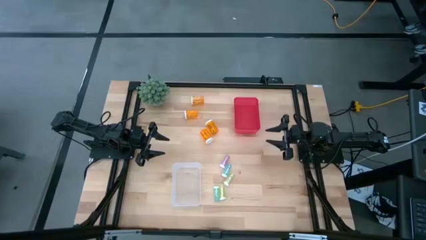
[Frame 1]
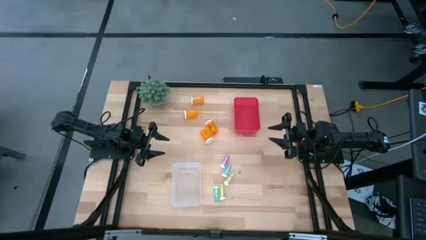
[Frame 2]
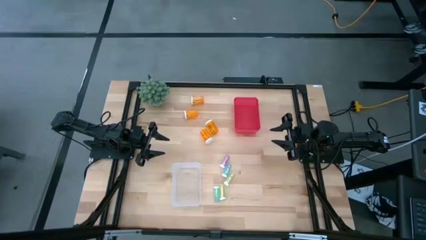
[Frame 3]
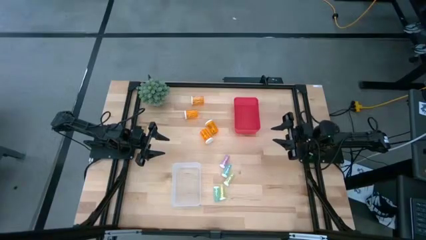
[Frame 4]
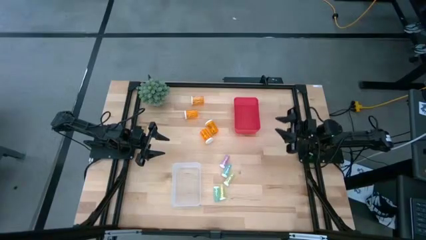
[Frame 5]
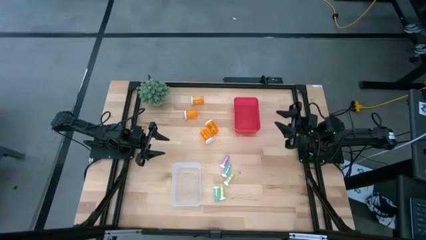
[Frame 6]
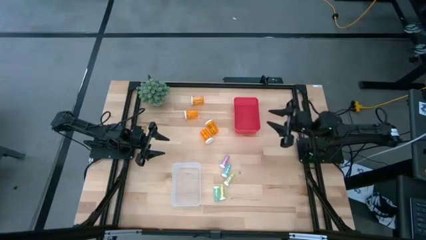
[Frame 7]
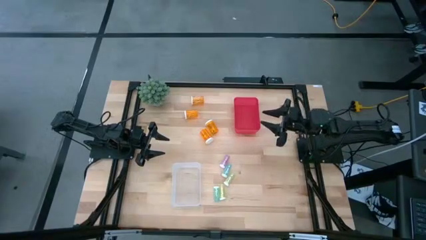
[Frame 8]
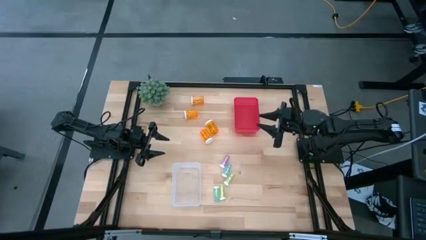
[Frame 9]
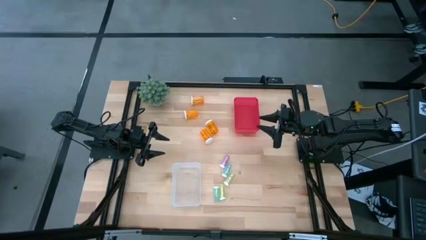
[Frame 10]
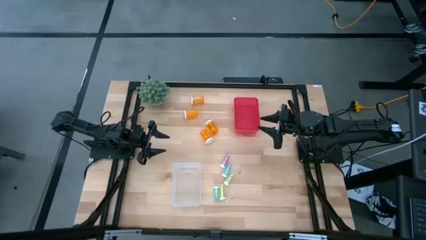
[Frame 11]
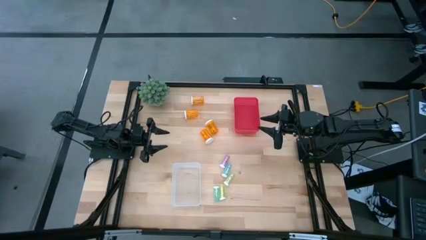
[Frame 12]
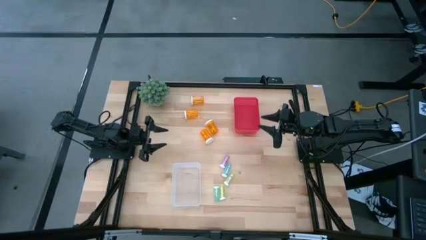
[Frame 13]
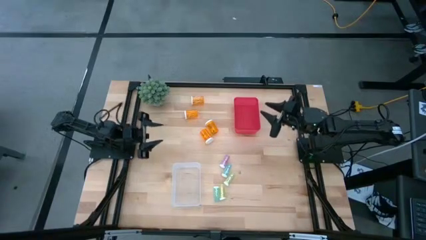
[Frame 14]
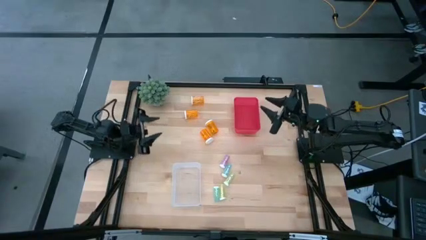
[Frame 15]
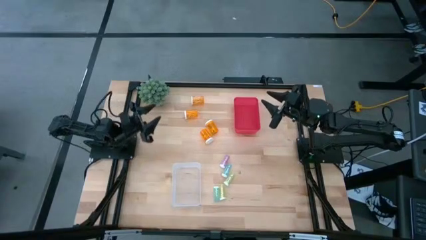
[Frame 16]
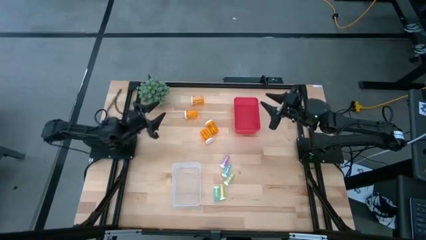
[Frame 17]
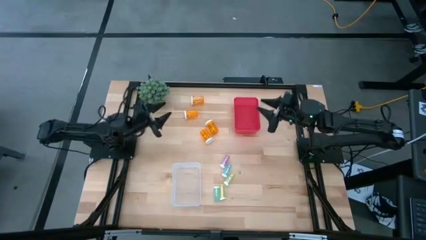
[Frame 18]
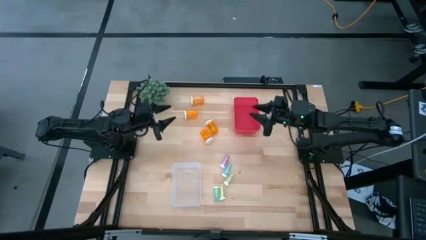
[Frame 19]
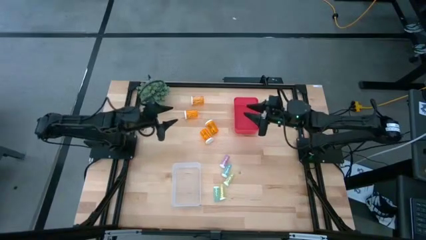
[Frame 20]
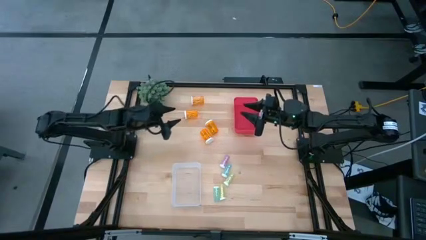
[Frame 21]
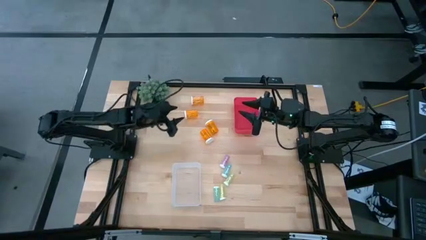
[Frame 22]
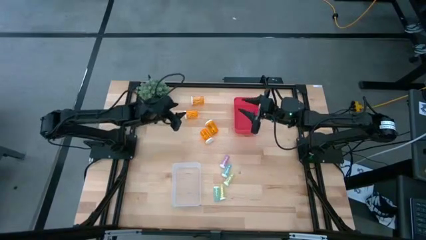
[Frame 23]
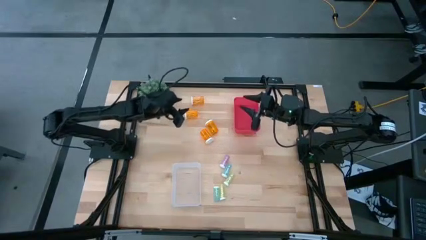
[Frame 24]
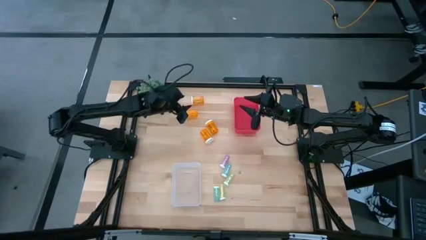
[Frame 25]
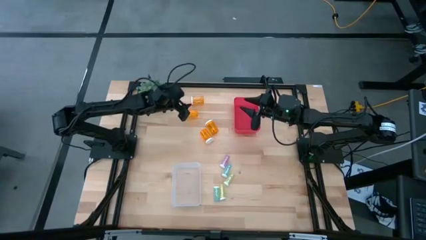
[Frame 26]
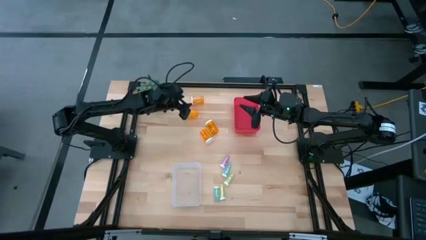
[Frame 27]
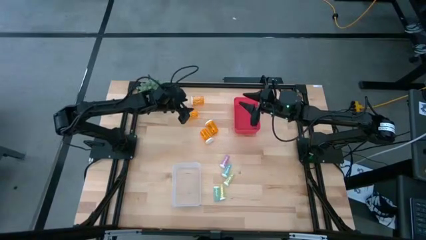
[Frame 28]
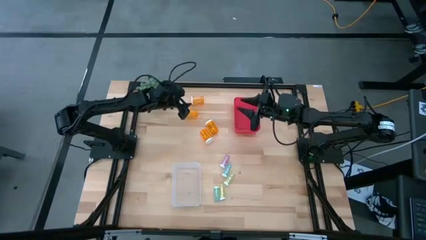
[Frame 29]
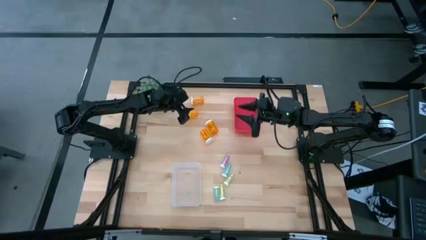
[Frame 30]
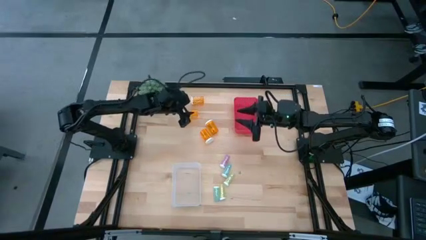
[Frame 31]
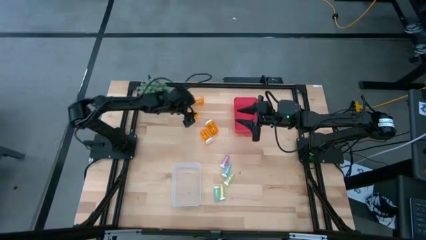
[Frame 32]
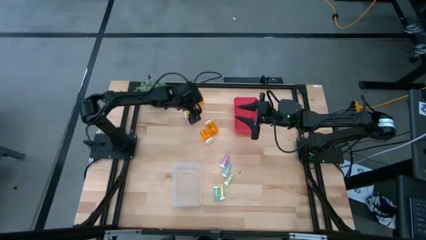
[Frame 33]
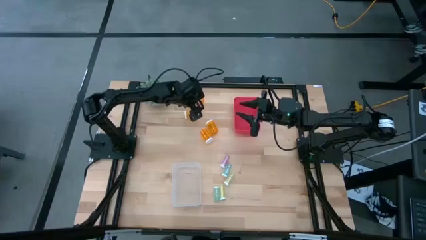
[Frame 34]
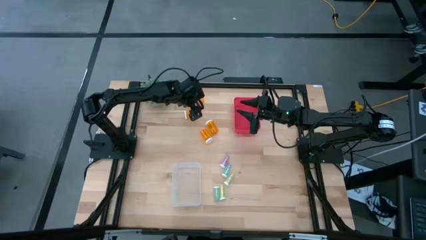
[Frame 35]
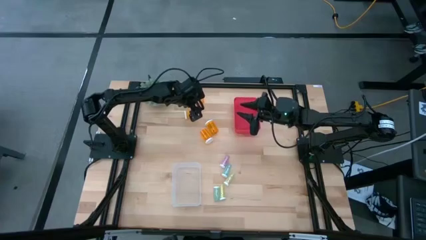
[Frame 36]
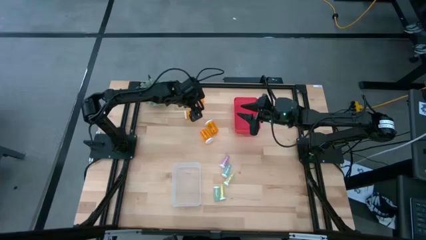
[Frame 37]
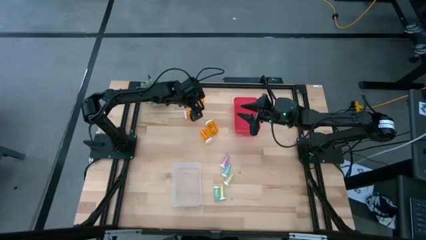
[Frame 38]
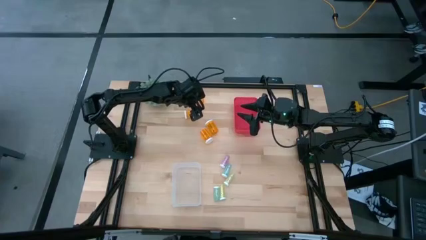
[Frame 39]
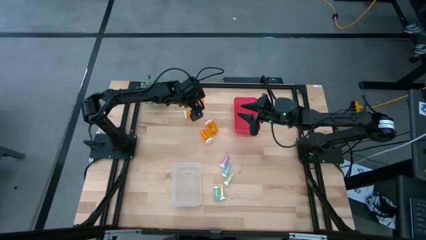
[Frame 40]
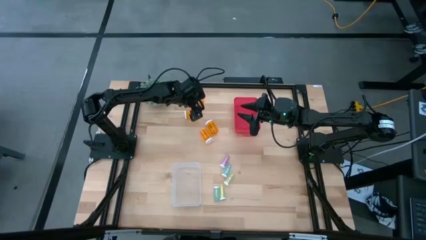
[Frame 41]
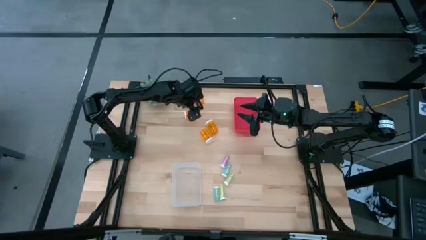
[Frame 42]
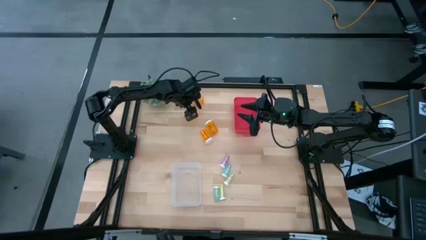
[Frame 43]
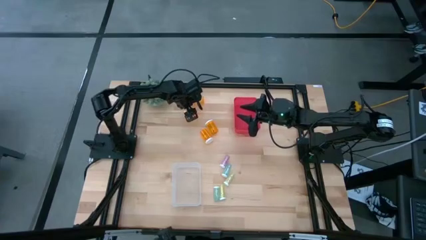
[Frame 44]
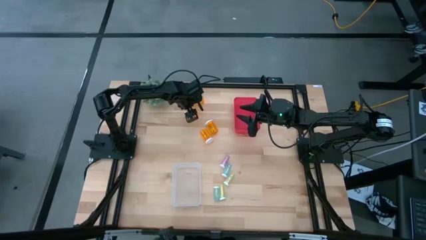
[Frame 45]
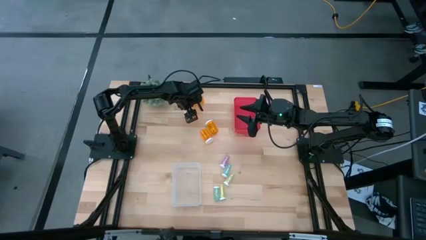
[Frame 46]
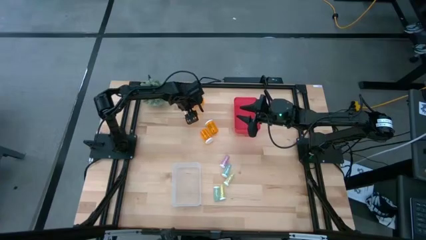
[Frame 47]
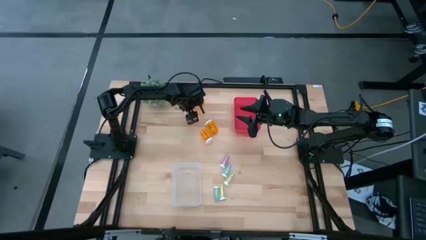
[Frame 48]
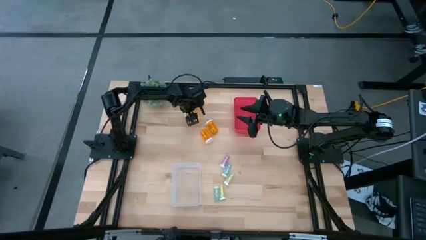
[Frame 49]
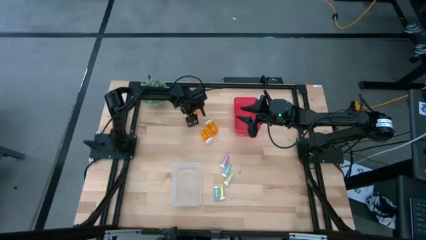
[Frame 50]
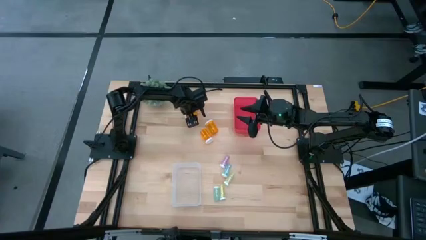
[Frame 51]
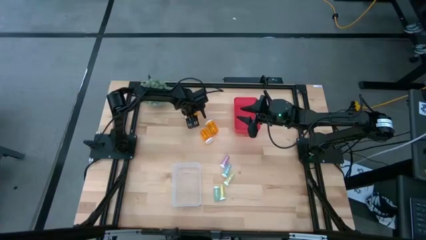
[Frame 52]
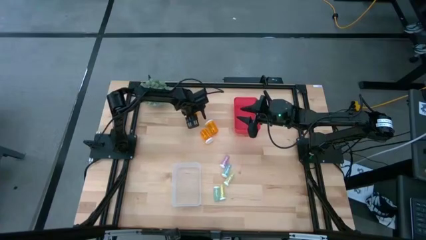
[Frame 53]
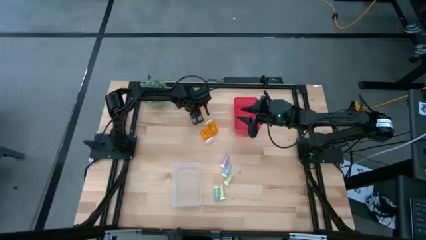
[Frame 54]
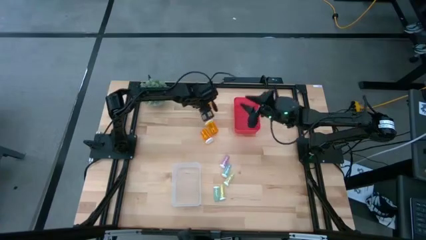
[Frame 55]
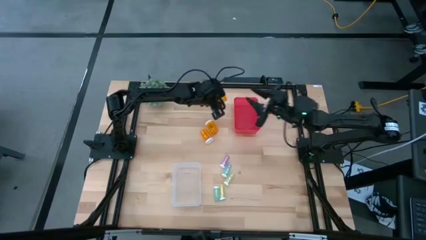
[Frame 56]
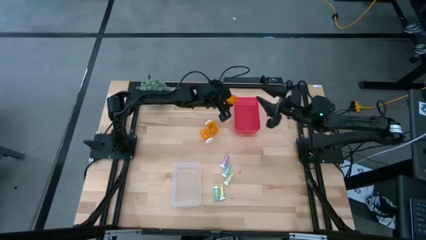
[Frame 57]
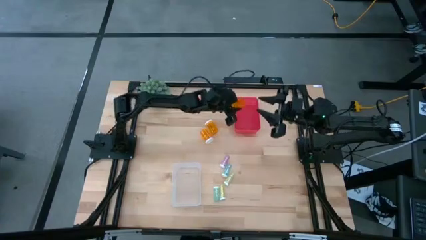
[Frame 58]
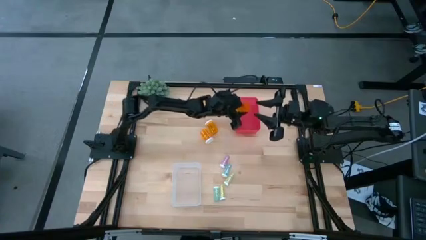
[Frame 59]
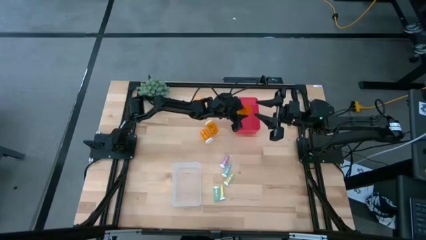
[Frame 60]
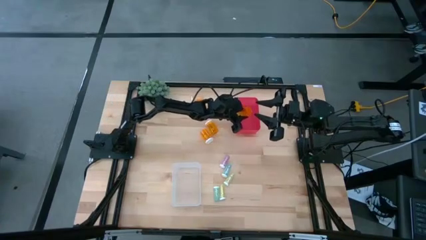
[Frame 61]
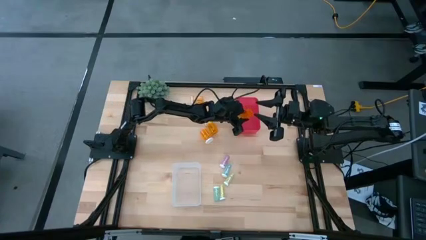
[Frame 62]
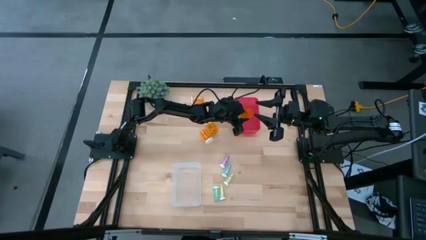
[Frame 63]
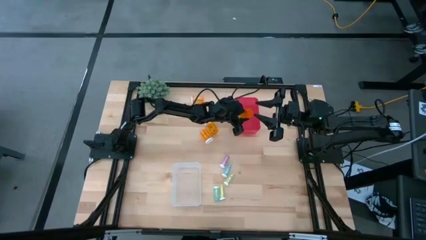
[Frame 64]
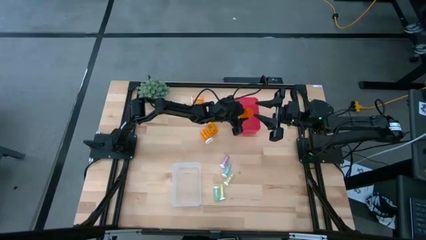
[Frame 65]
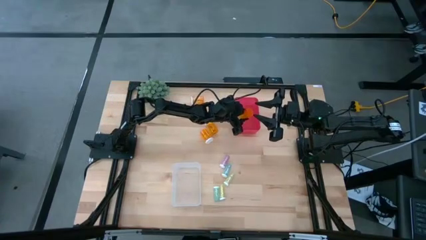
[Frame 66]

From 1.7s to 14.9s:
Task: Pick and place medicine bottles into bin by pill shape (circle, oval)
Put the large orange pill bottle into the red bin
